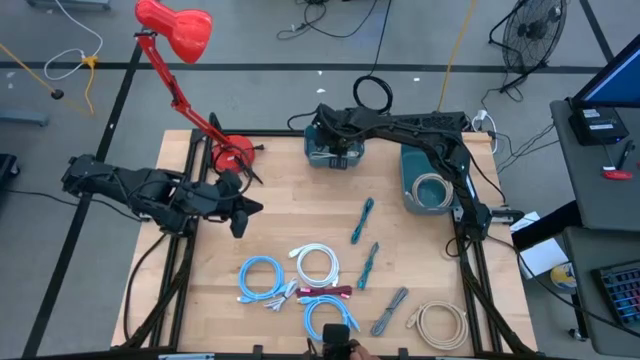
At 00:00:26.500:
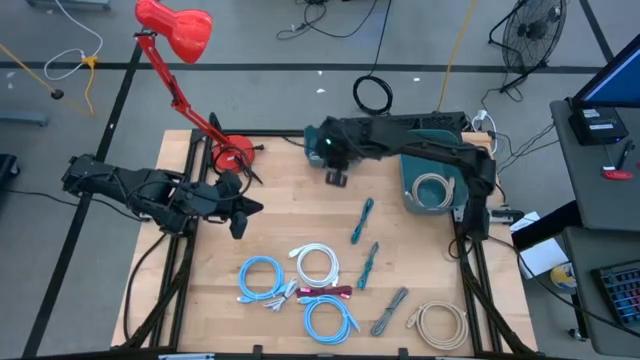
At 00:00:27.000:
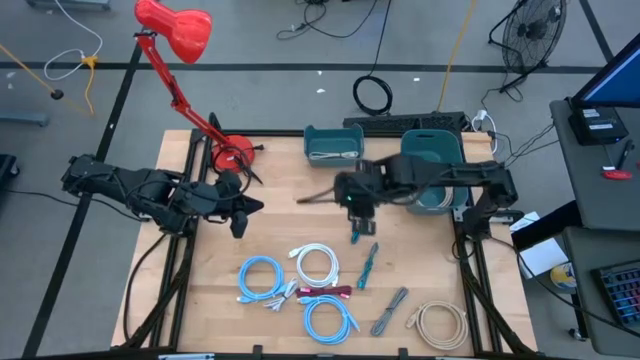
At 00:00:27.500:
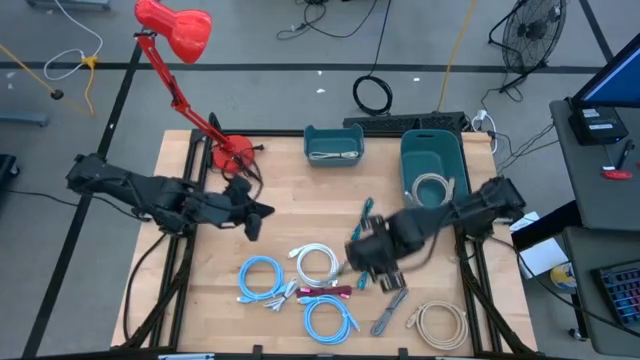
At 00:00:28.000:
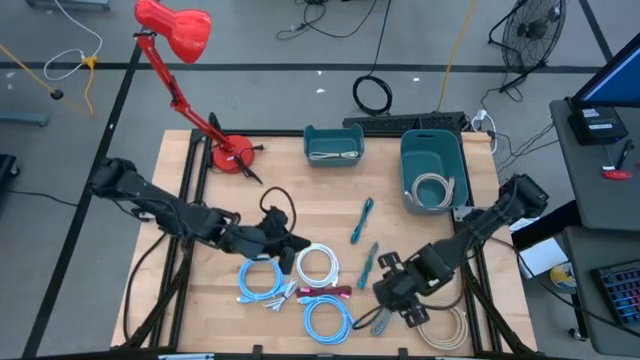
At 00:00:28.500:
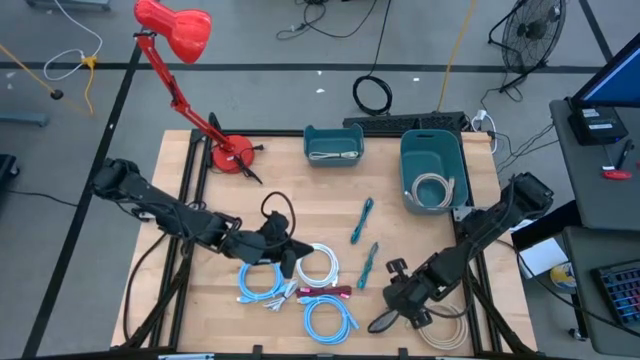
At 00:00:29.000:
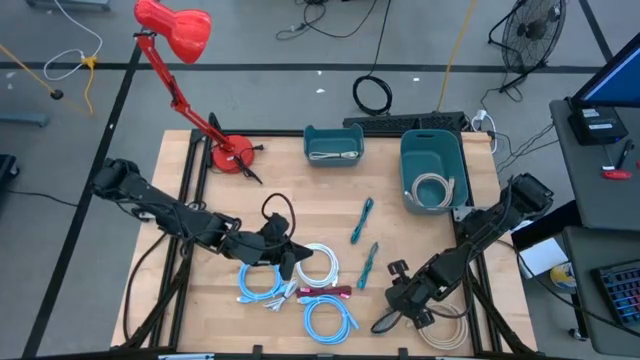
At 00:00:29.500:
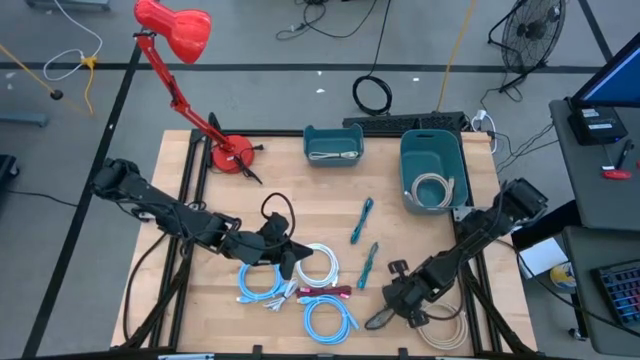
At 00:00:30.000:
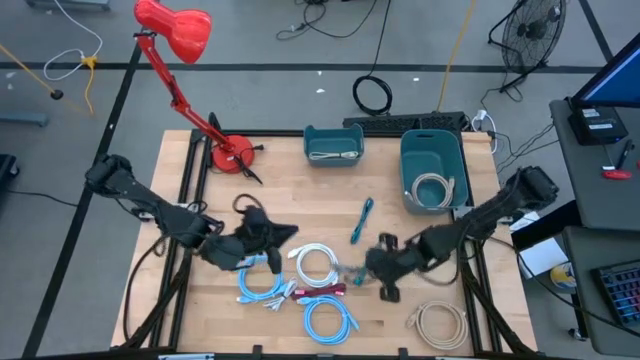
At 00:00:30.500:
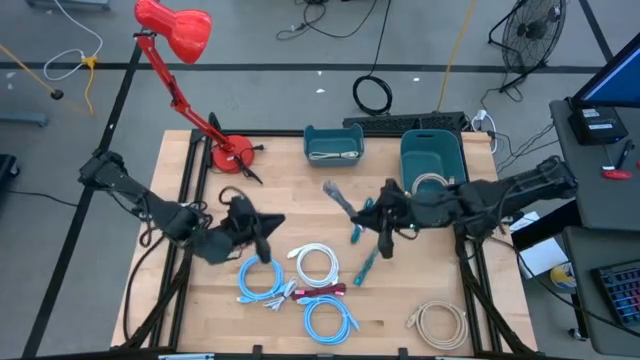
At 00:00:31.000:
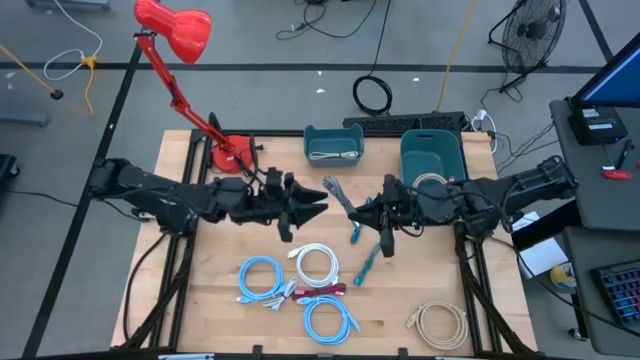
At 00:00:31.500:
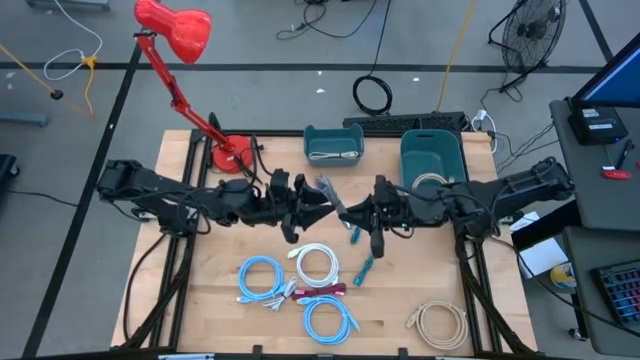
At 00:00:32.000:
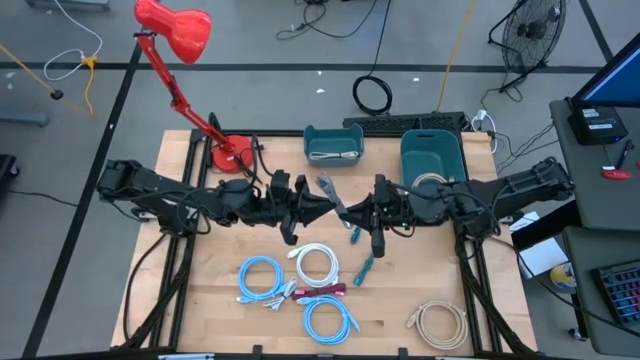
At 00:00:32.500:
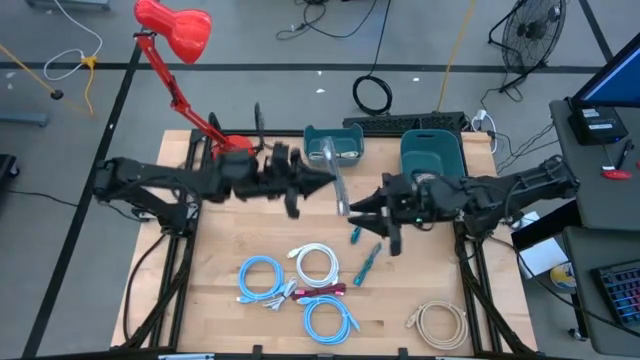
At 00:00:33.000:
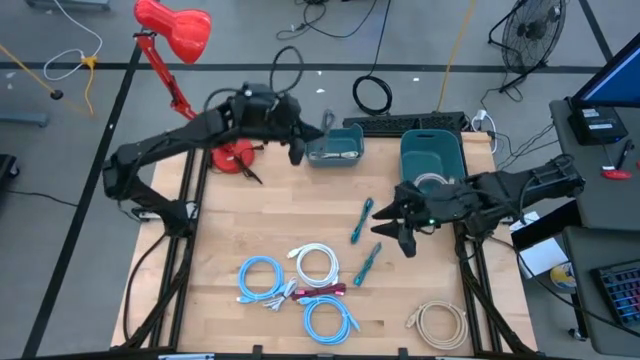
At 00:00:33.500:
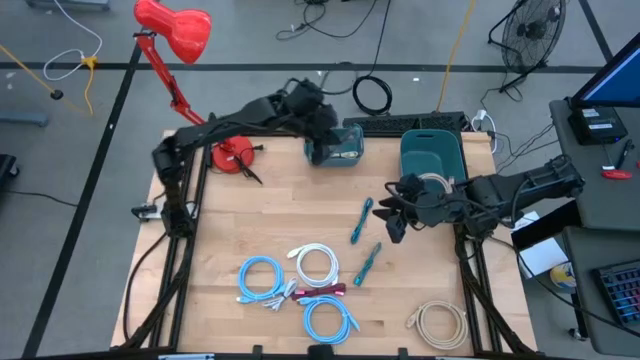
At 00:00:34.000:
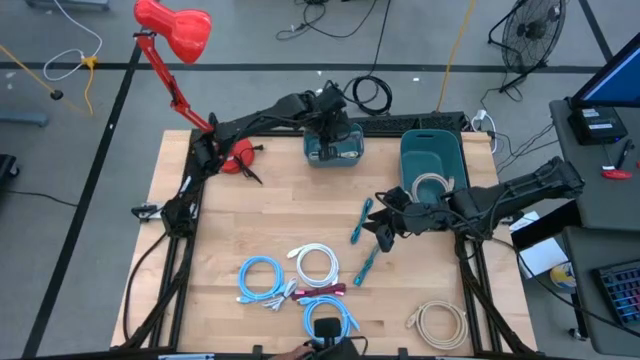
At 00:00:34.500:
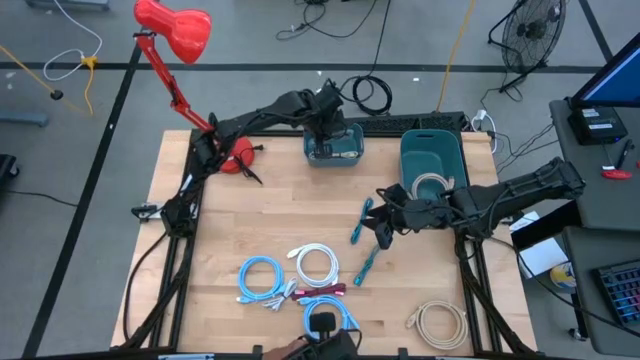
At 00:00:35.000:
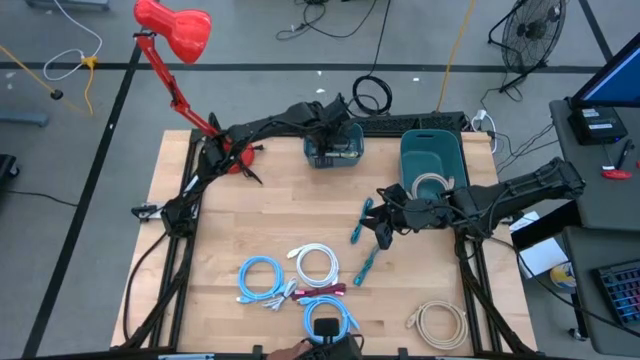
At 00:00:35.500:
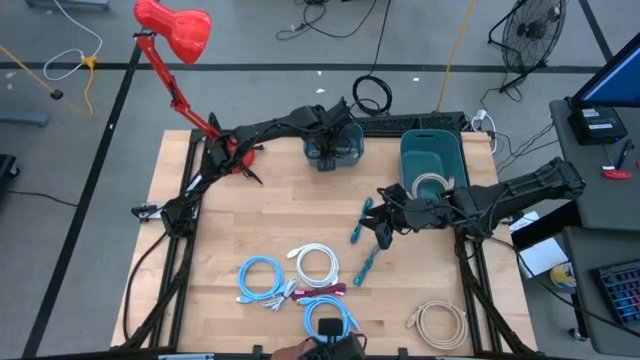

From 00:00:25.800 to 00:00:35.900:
Task: Pick & Place USB Port
Put the black charger cable into the left blue bin

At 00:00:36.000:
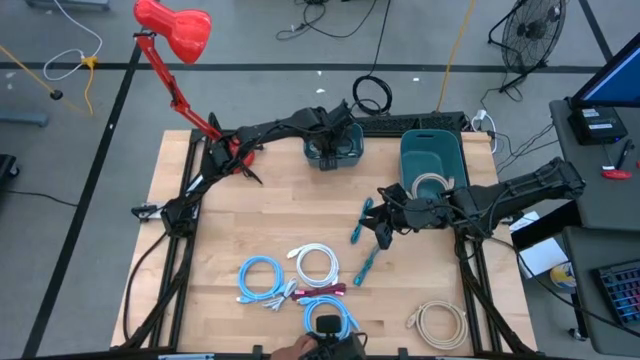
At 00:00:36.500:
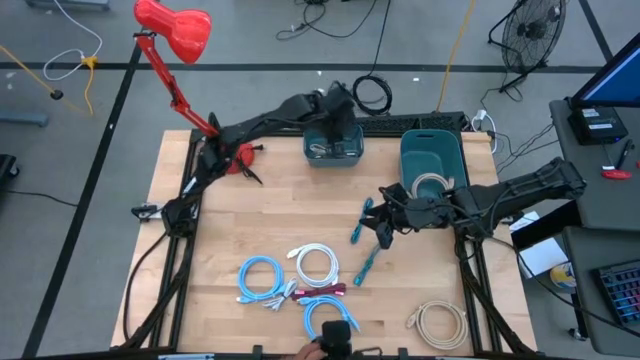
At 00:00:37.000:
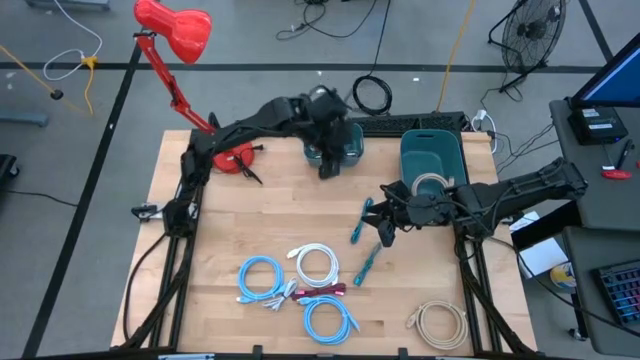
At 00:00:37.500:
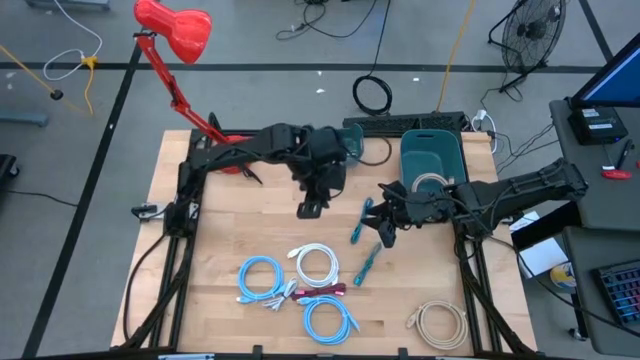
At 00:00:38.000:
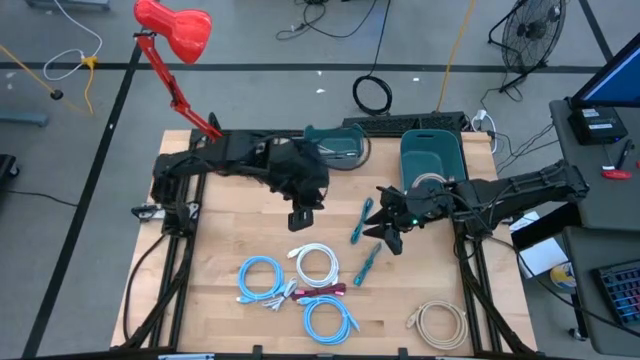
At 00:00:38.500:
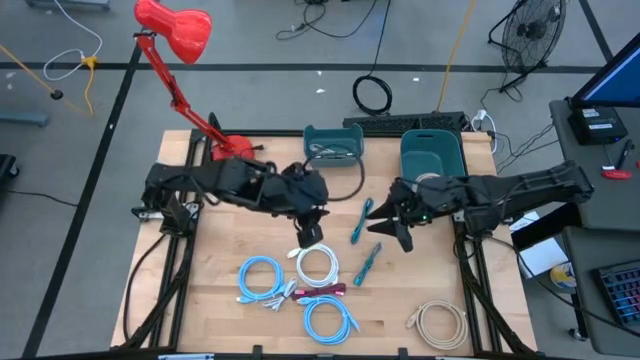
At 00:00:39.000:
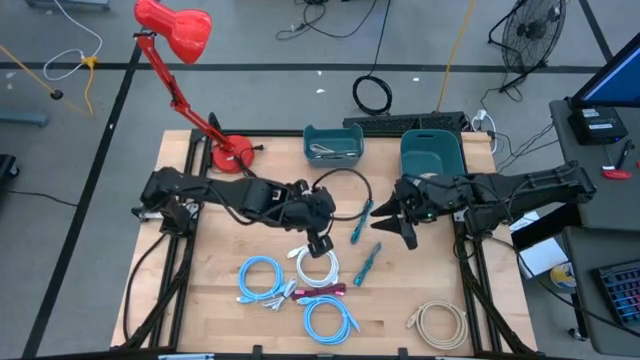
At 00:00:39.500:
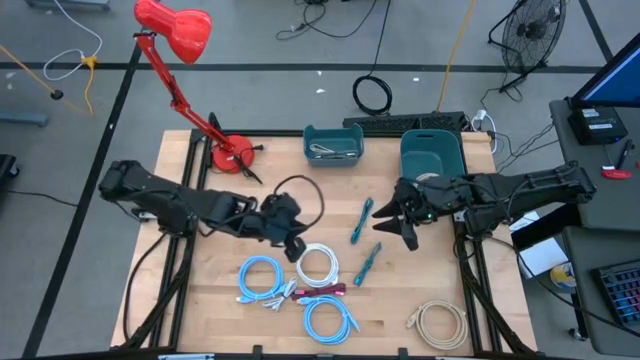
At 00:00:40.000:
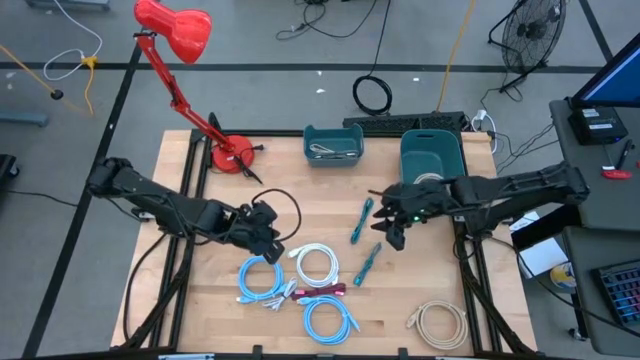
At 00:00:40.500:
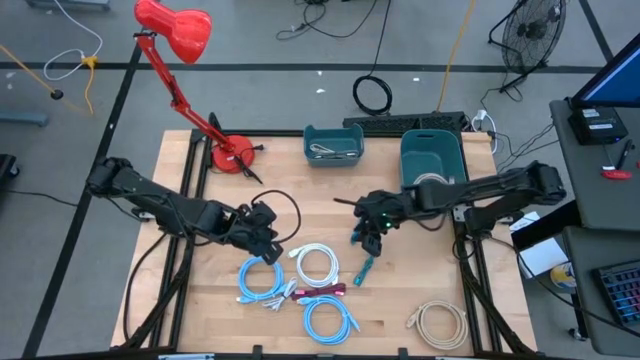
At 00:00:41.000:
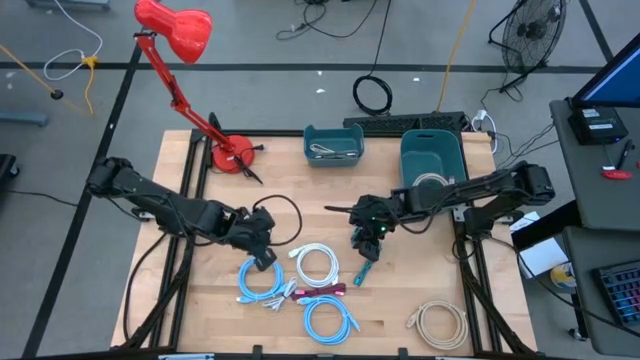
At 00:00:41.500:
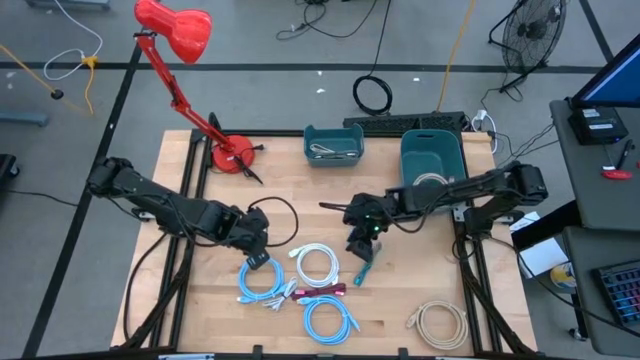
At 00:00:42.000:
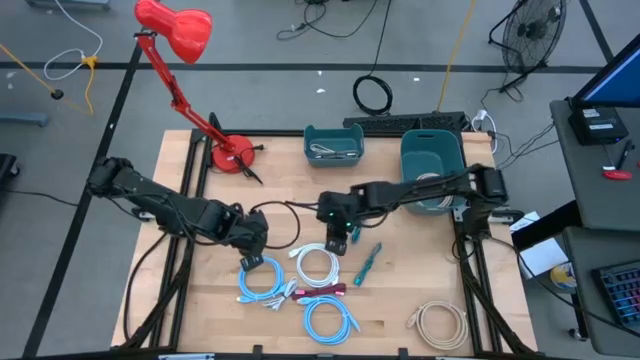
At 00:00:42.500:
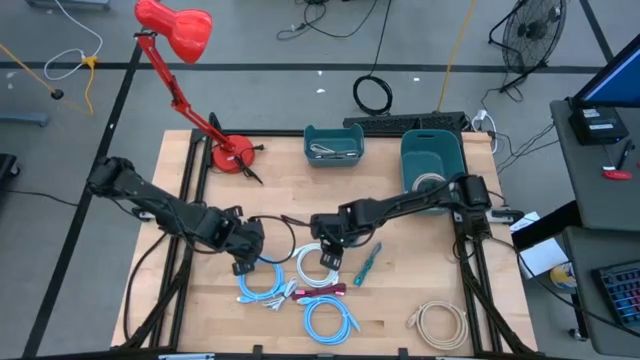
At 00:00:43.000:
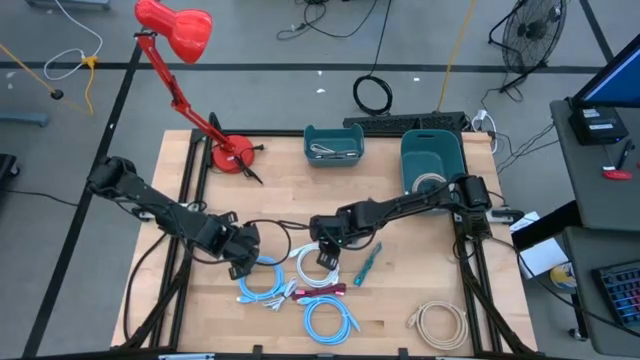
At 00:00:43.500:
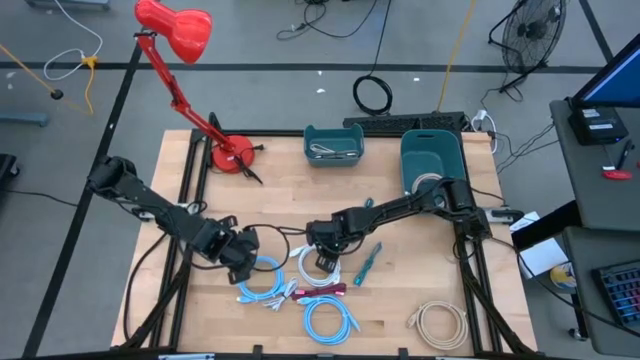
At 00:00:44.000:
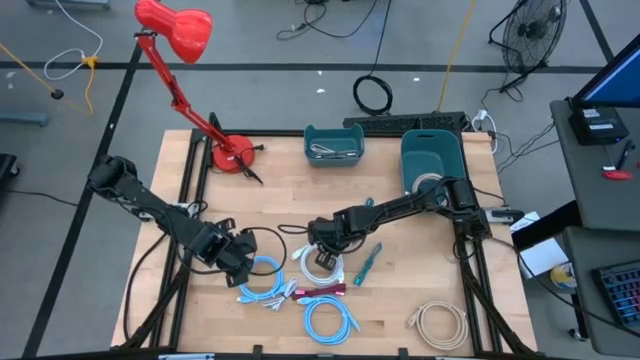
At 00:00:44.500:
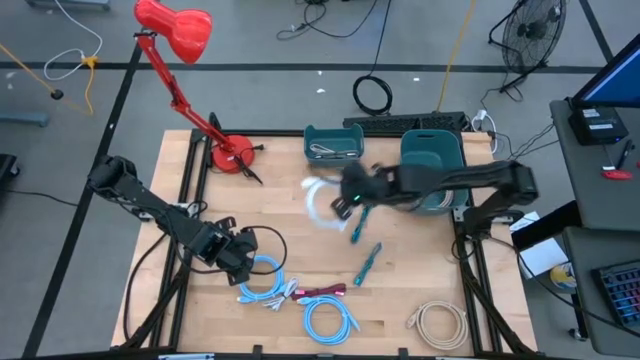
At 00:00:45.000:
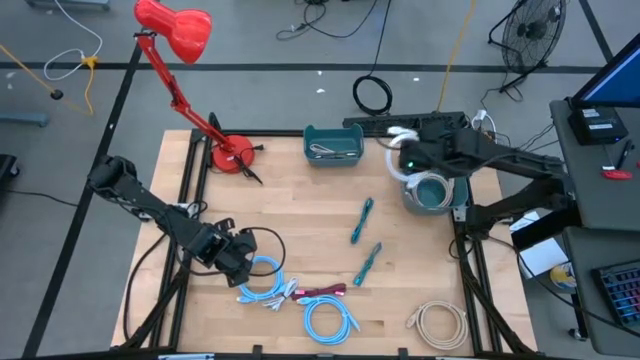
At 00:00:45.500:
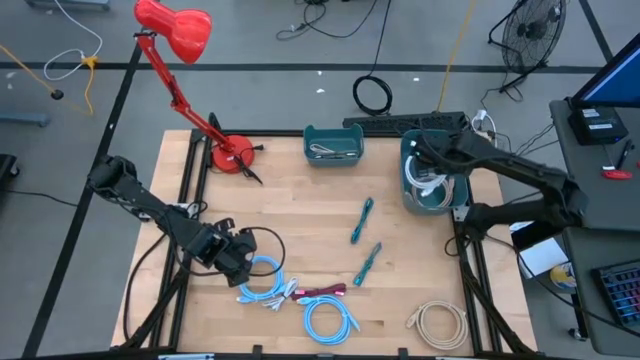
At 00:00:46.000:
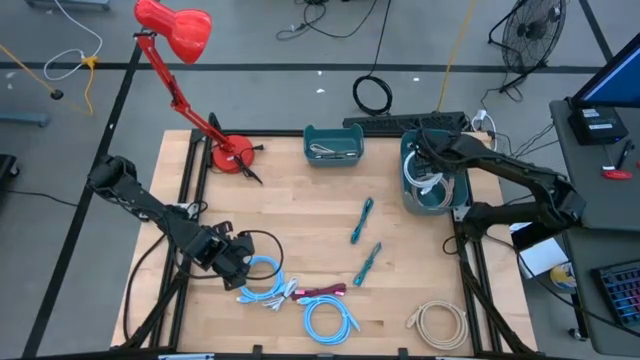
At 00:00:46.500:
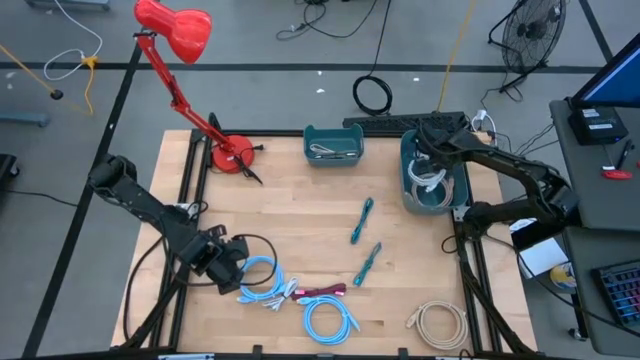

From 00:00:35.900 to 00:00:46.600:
Put the white HDMI cable into the right blue bin
